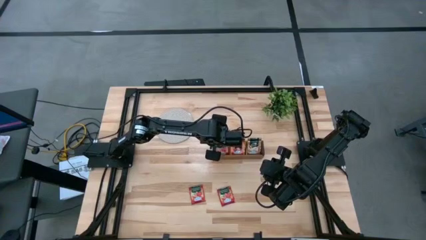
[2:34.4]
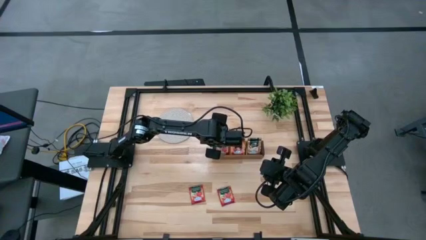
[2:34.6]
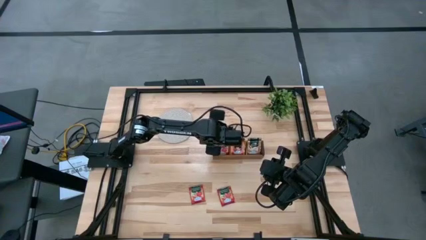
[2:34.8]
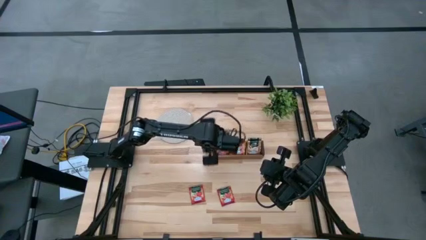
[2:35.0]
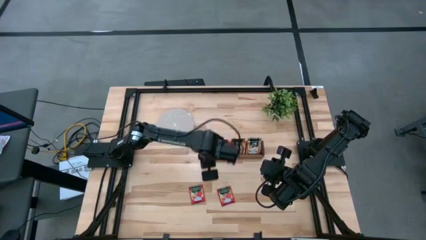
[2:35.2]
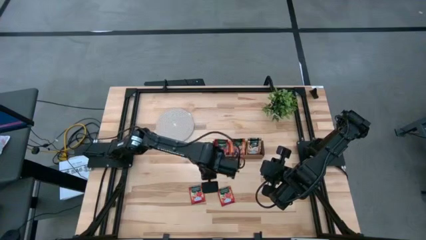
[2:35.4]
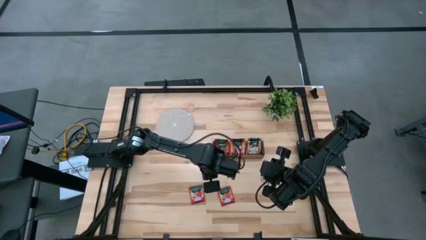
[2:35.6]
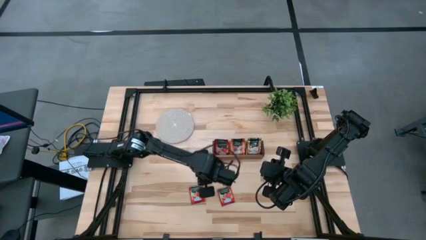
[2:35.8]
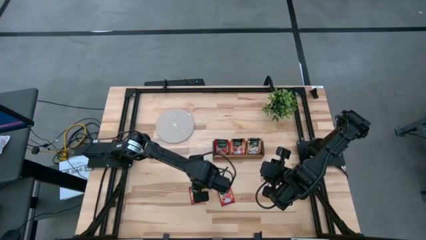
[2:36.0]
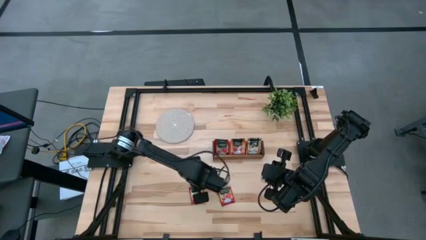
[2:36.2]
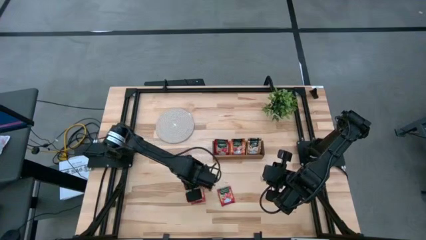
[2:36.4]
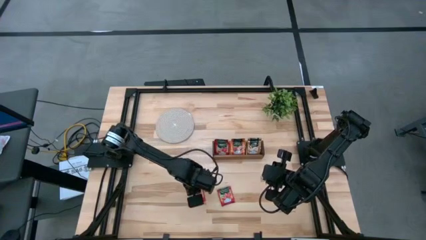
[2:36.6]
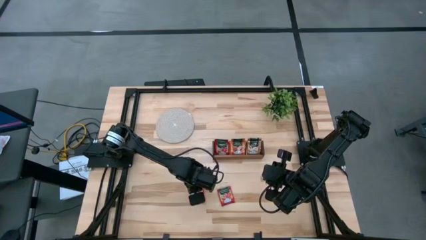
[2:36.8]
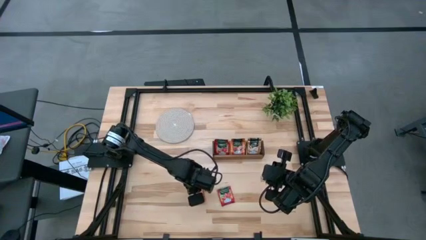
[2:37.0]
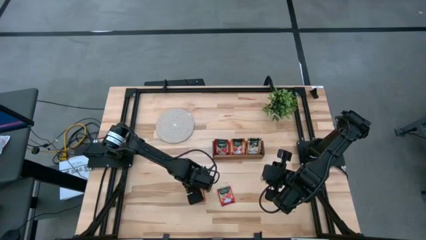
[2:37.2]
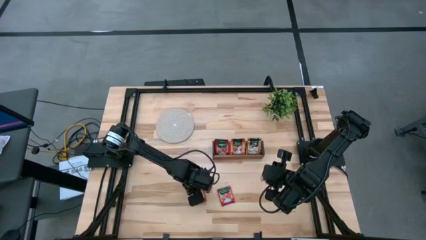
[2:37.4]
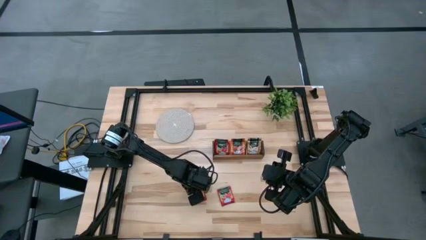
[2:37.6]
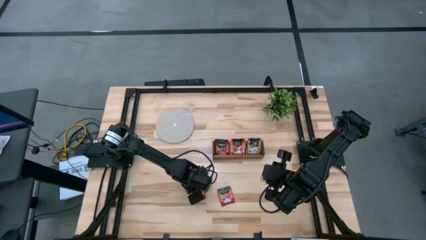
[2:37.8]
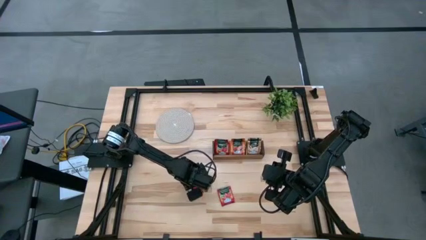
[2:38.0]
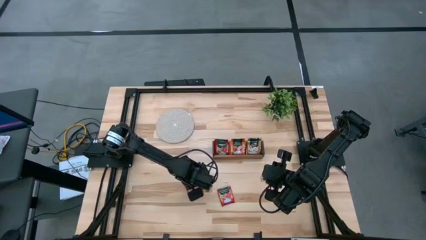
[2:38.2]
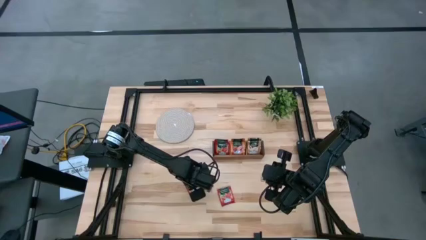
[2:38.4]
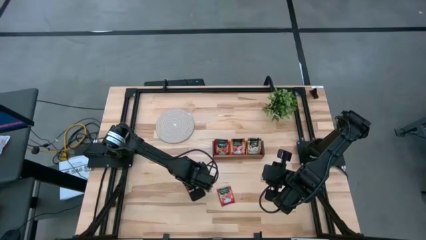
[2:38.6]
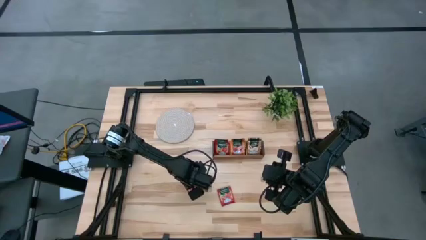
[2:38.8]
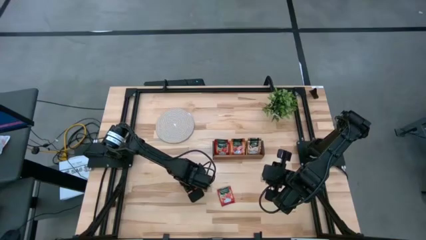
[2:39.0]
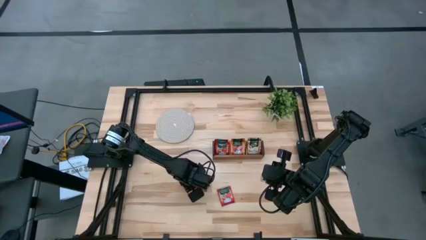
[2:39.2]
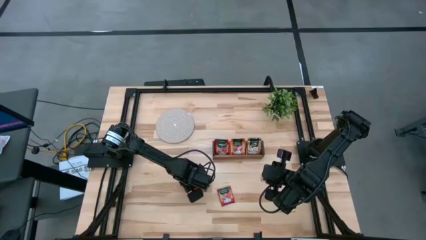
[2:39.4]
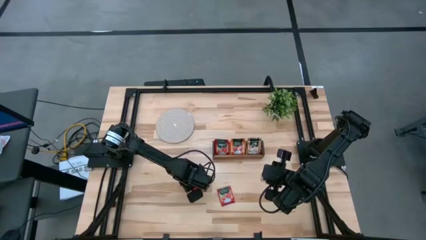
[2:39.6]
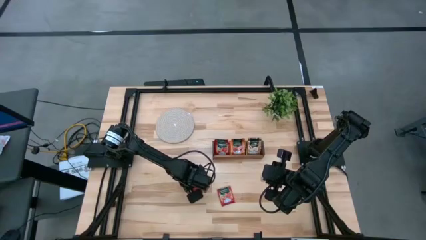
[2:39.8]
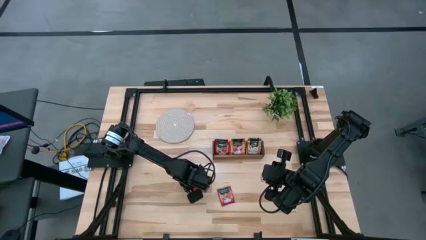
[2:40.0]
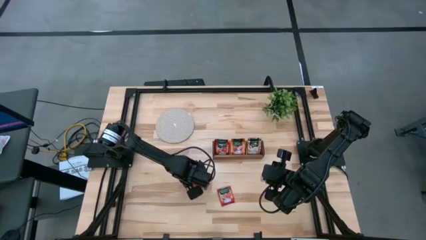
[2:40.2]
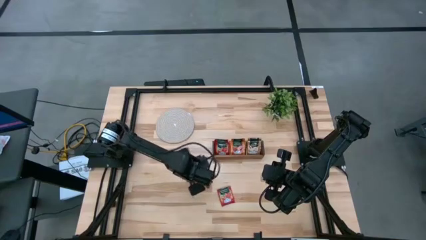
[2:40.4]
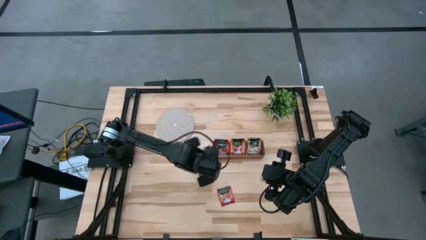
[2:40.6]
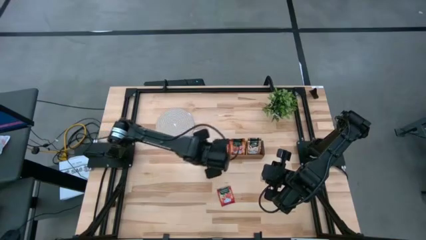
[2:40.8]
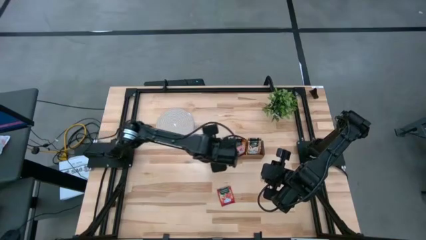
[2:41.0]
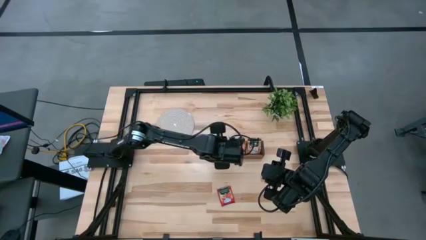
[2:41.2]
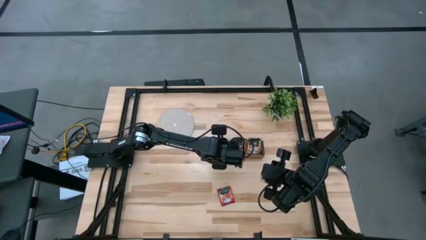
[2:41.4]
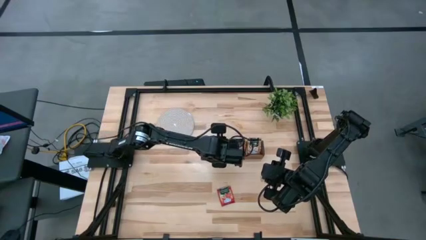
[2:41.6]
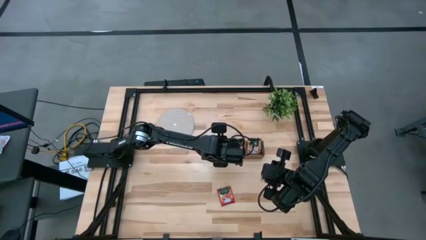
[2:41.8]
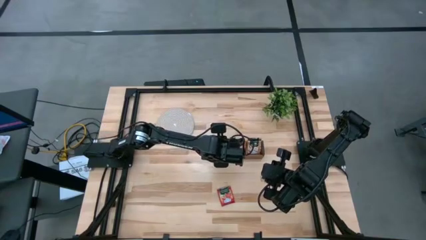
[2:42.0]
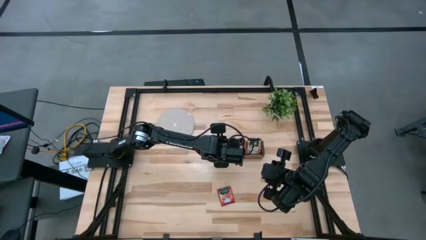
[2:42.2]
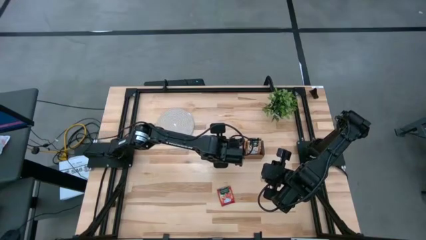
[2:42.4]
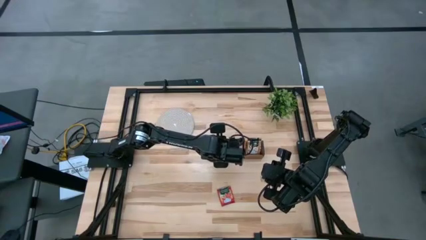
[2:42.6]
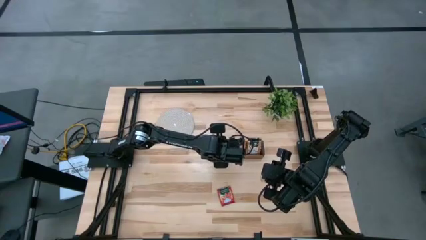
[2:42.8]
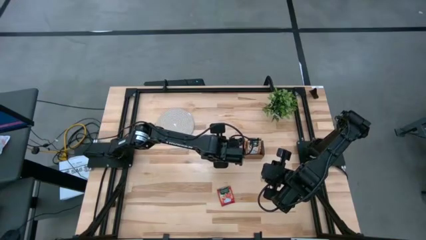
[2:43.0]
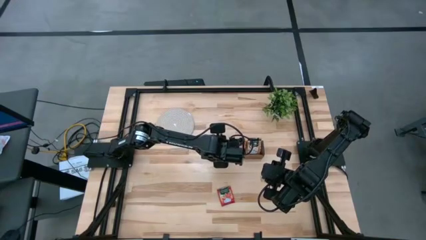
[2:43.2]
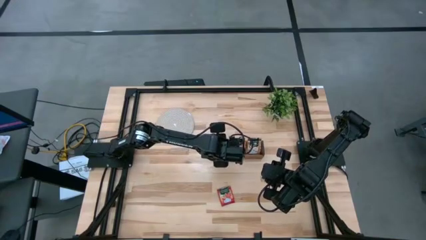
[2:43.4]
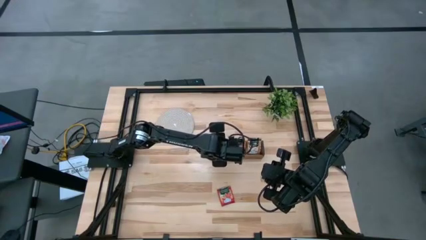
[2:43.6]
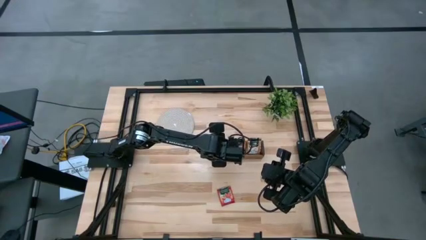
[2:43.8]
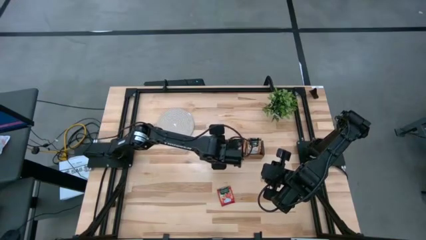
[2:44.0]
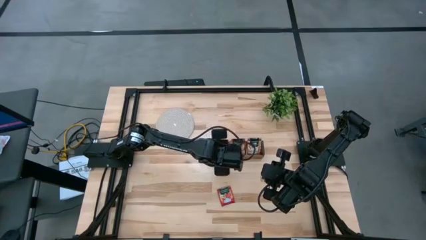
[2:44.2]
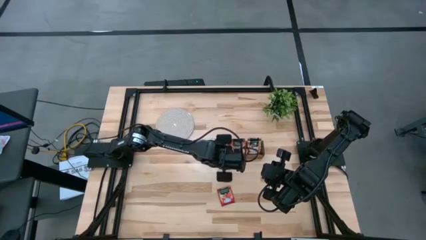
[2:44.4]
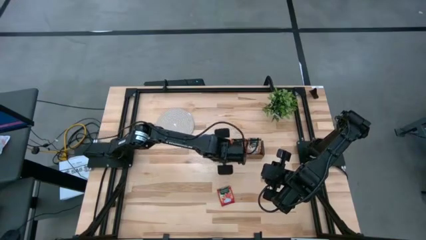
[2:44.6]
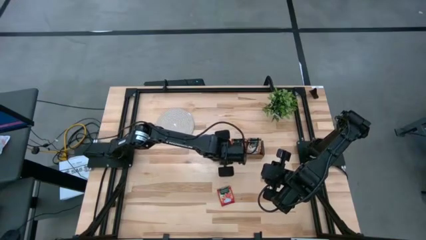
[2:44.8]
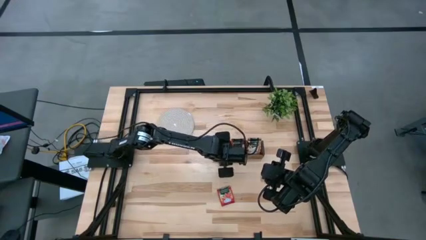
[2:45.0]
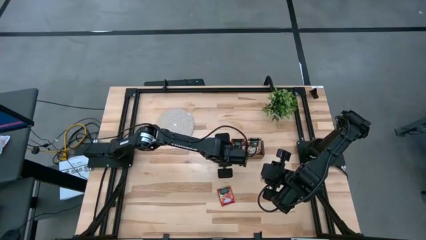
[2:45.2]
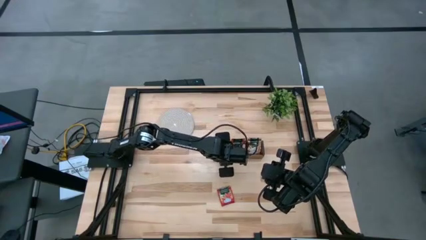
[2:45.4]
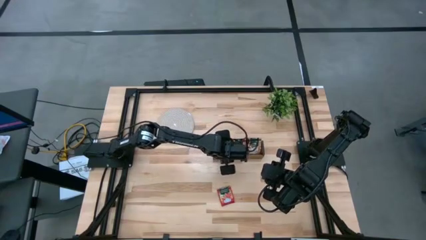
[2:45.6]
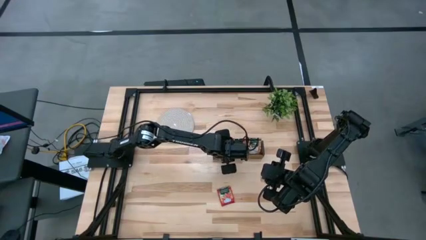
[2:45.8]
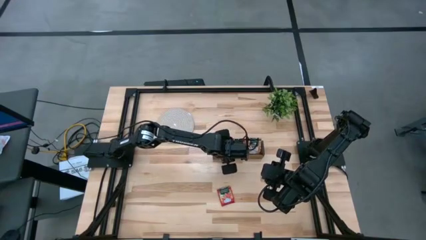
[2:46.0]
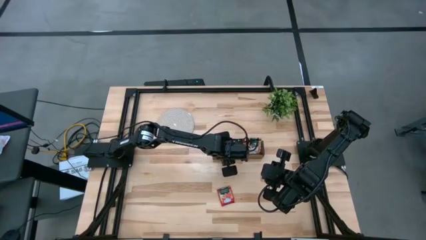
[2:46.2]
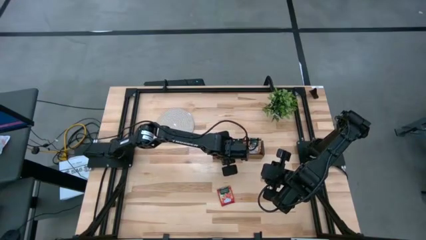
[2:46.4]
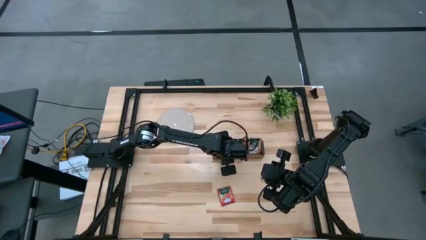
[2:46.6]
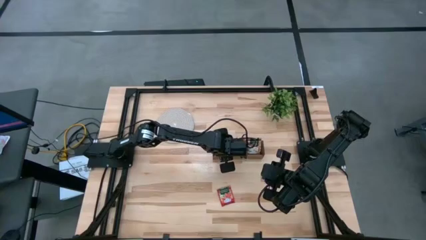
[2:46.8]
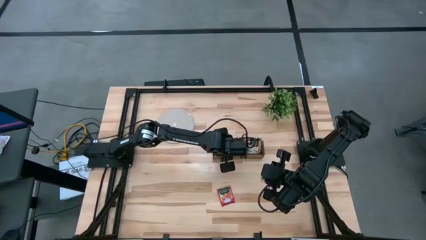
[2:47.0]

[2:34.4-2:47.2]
Task: Pick & Place Tea
Put the red tea bag into the left section of the wooden organizer

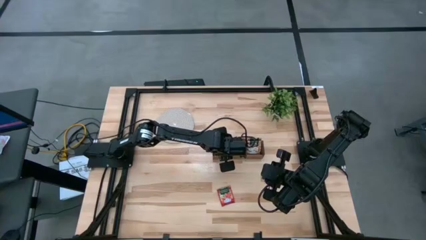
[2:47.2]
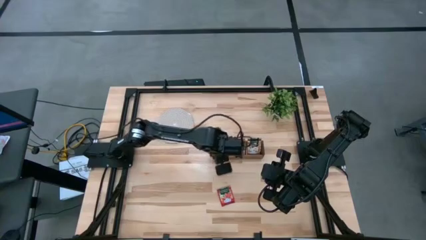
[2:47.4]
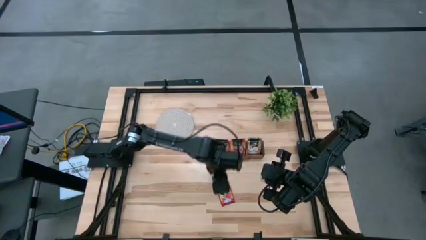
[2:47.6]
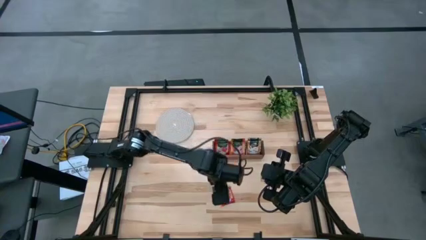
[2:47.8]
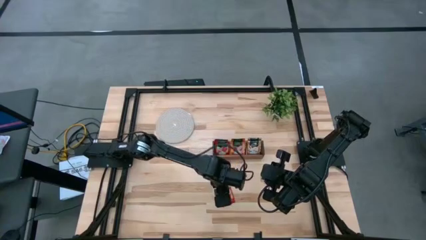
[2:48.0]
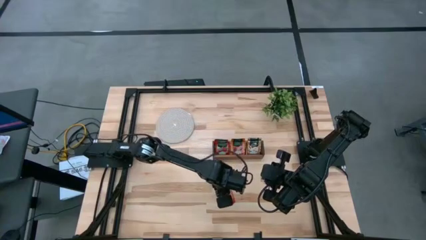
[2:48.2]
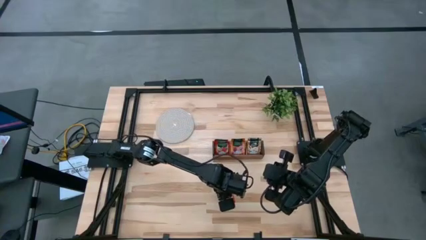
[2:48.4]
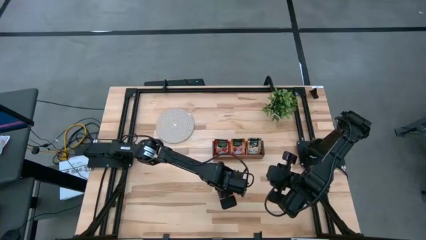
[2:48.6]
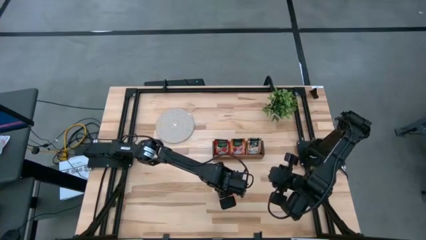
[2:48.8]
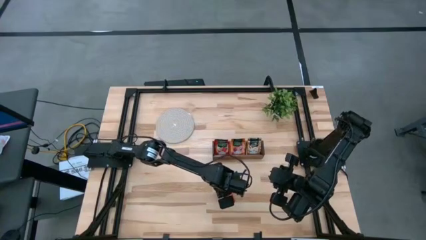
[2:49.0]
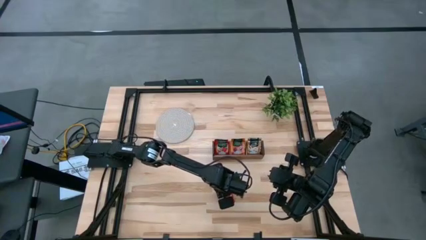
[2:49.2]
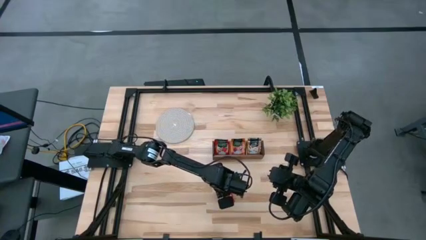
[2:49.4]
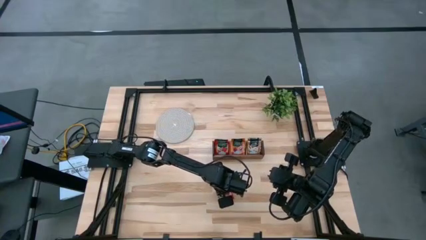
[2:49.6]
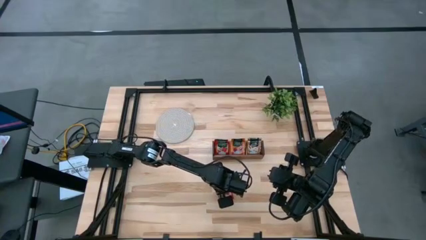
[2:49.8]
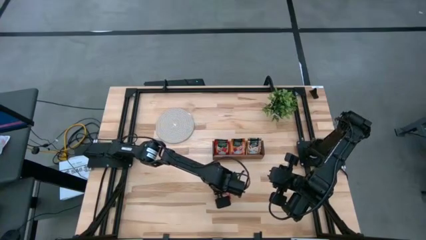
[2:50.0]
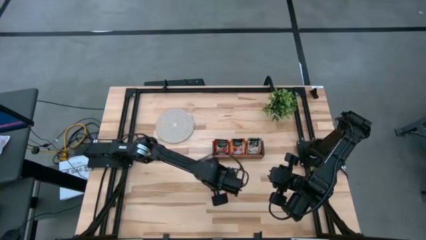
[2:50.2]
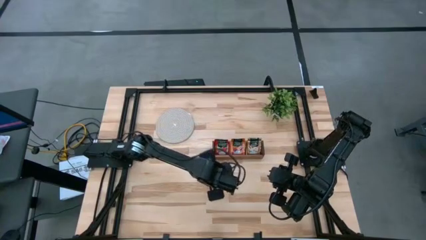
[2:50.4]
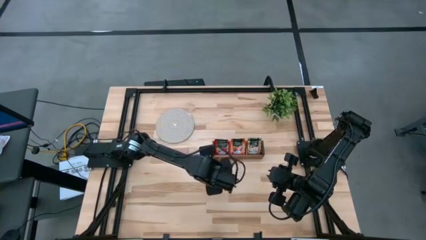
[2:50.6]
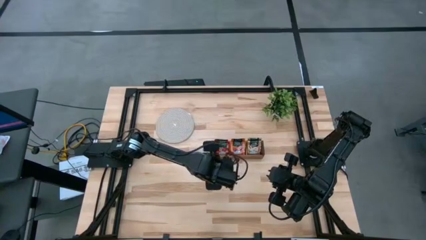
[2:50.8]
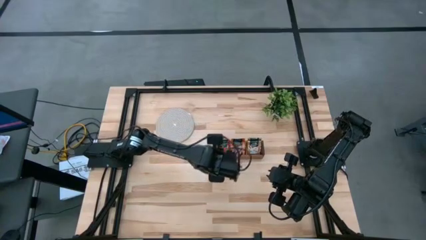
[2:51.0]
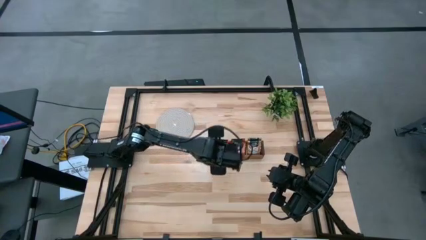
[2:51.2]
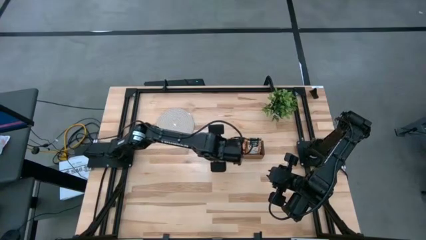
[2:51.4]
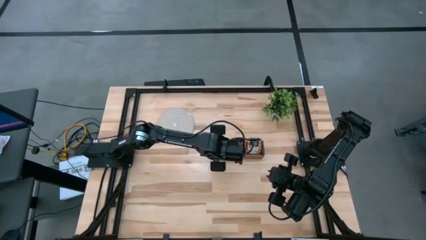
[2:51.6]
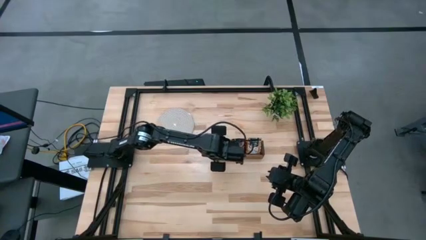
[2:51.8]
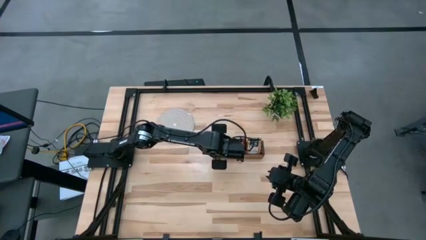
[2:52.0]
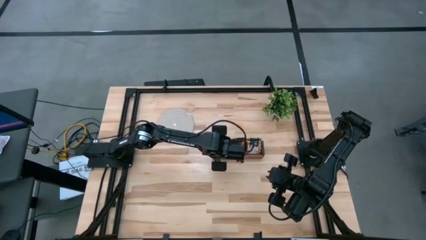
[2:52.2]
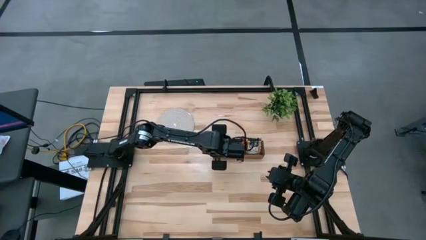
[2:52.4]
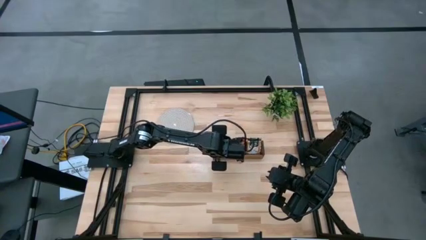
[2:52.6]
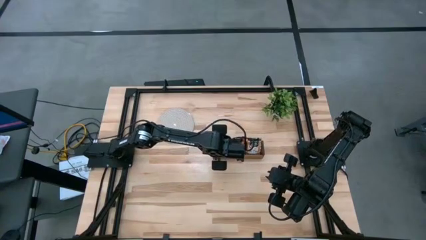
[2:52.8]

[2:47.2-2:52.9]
Put the red tea bag into the left section of the wooden organizer
